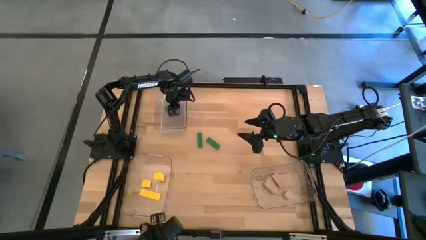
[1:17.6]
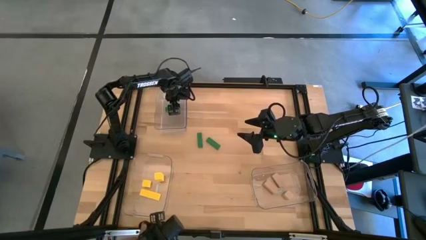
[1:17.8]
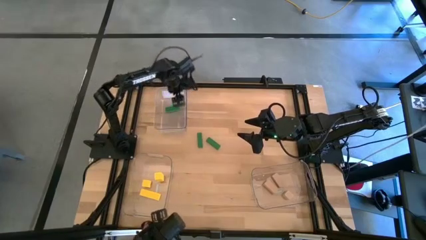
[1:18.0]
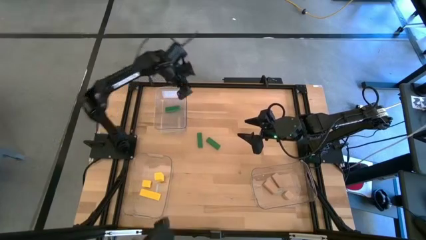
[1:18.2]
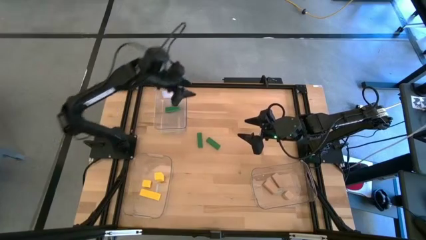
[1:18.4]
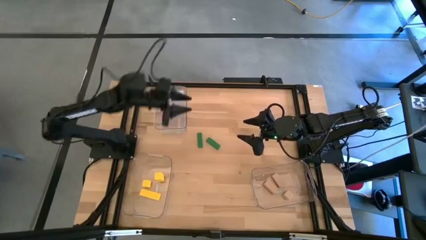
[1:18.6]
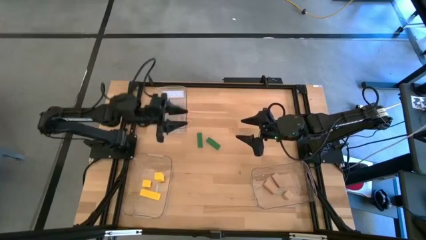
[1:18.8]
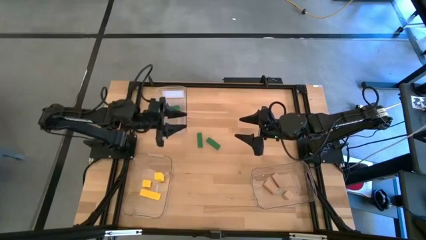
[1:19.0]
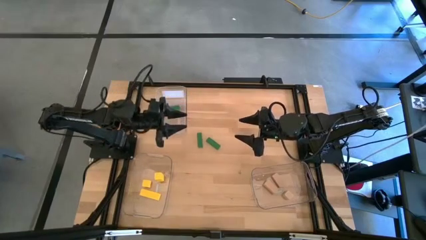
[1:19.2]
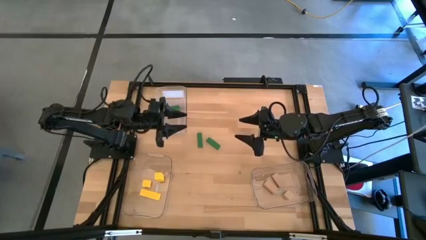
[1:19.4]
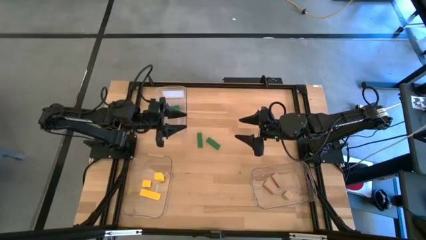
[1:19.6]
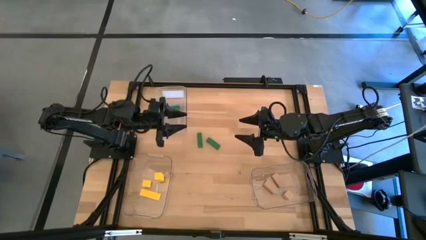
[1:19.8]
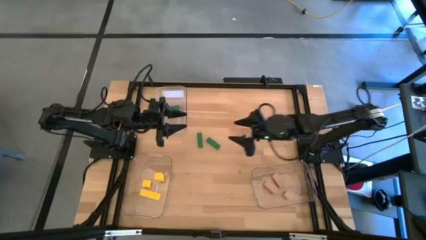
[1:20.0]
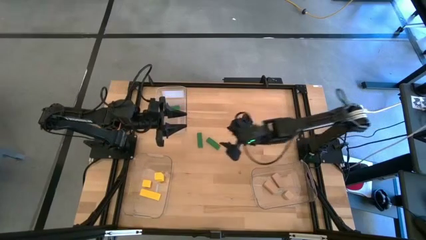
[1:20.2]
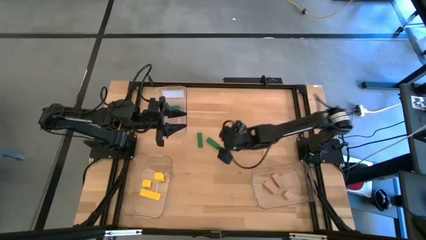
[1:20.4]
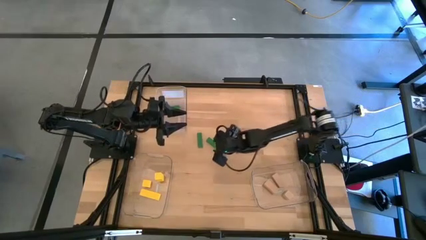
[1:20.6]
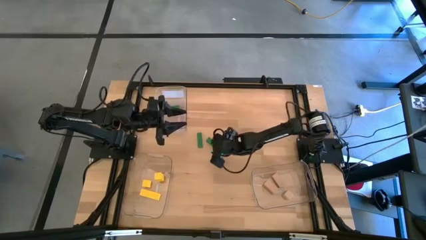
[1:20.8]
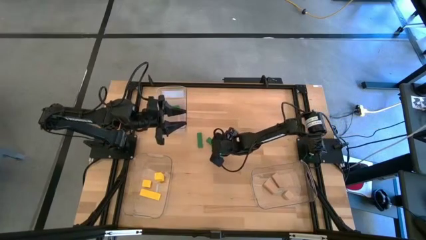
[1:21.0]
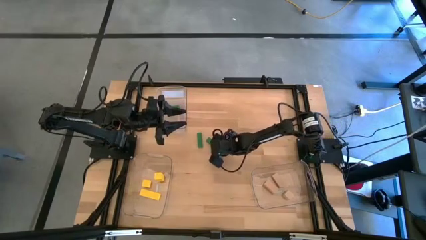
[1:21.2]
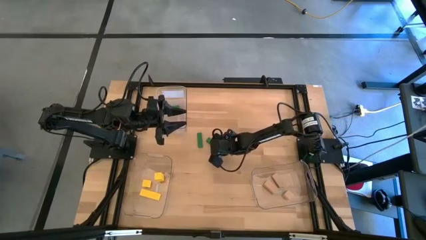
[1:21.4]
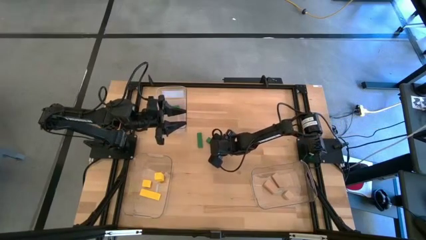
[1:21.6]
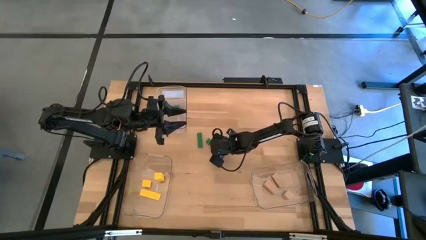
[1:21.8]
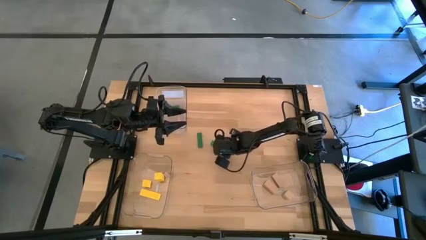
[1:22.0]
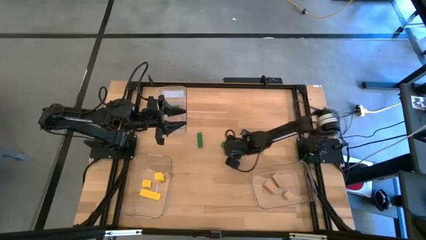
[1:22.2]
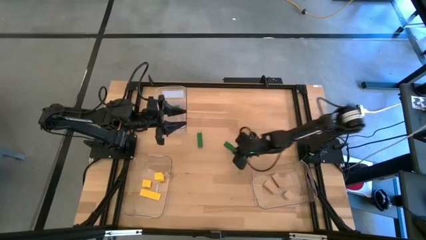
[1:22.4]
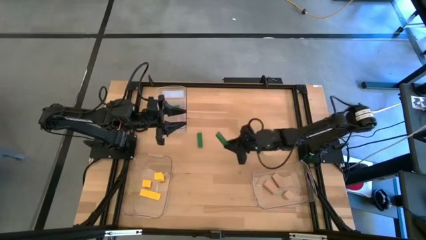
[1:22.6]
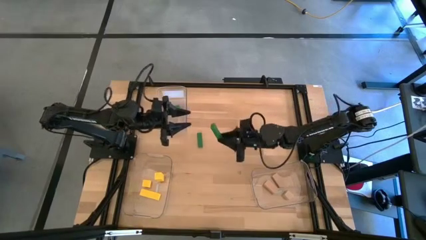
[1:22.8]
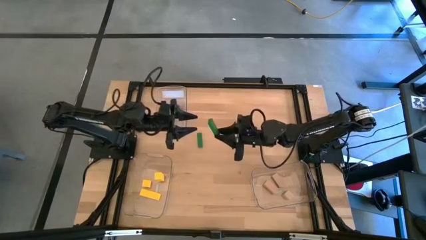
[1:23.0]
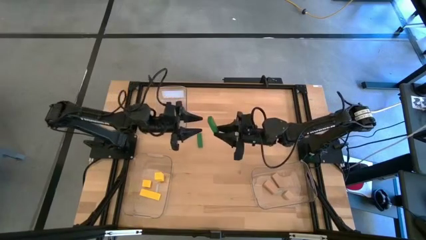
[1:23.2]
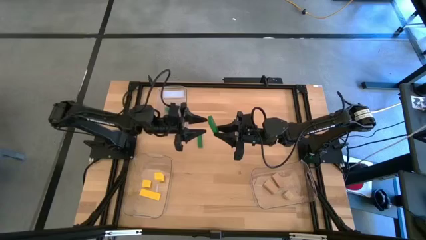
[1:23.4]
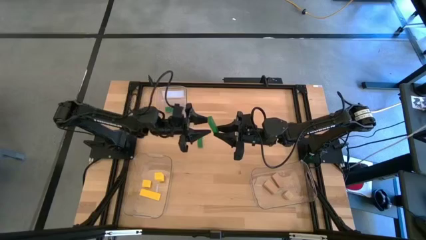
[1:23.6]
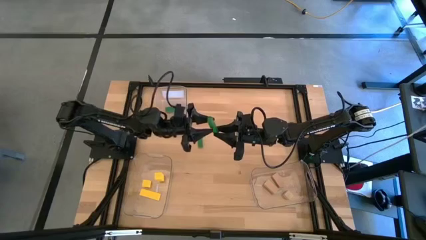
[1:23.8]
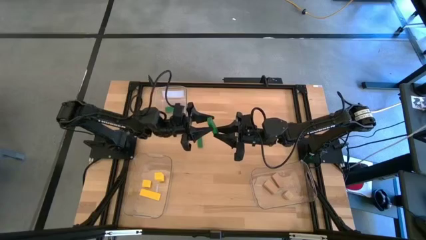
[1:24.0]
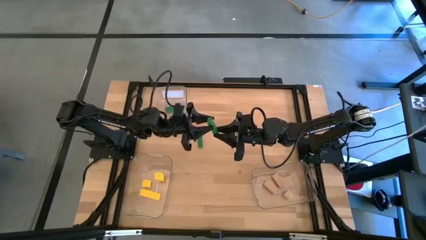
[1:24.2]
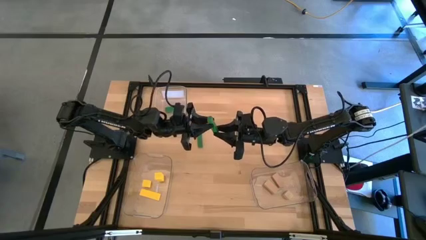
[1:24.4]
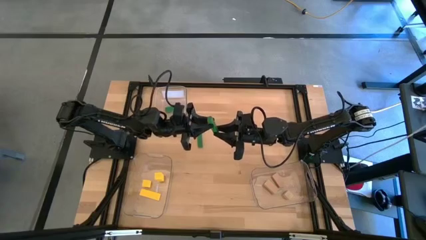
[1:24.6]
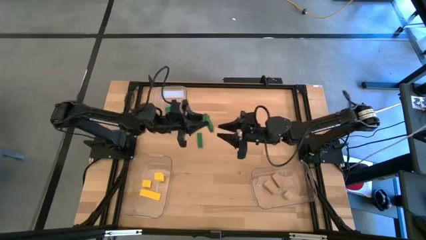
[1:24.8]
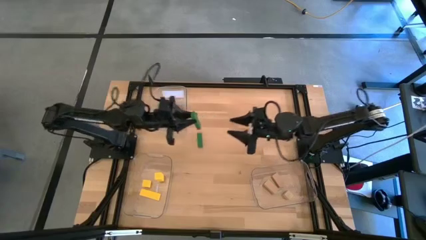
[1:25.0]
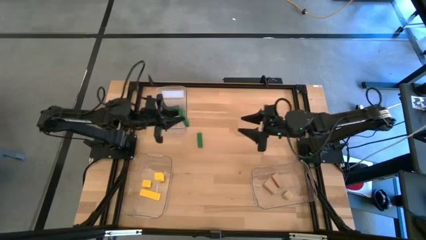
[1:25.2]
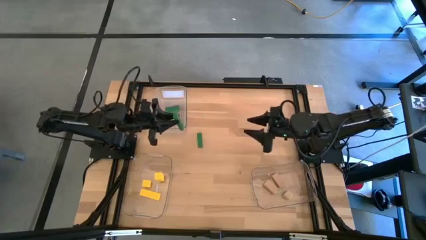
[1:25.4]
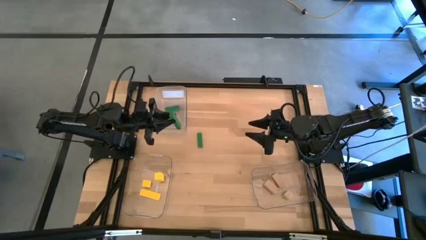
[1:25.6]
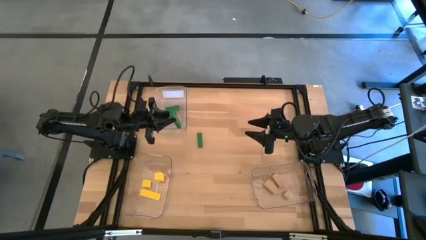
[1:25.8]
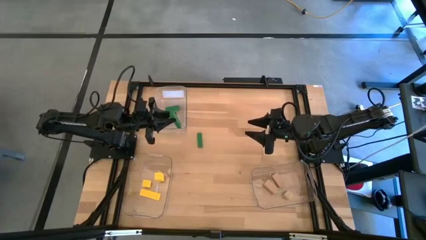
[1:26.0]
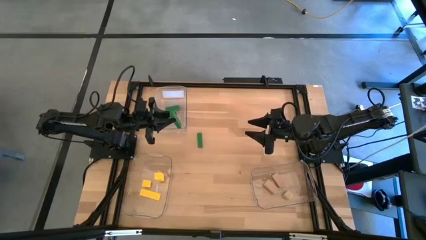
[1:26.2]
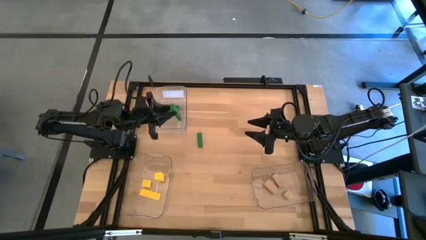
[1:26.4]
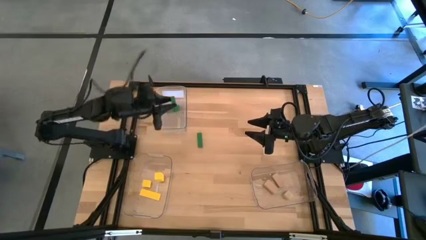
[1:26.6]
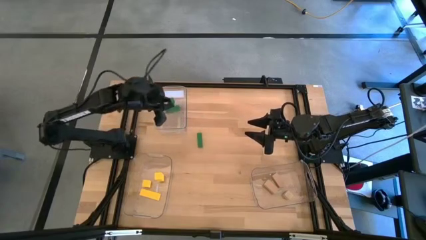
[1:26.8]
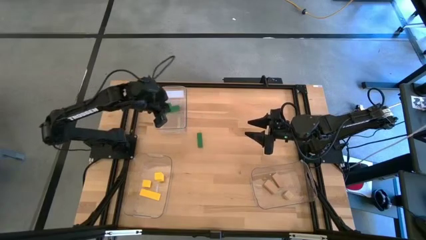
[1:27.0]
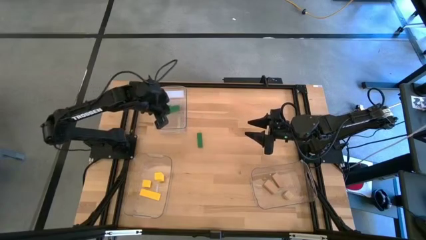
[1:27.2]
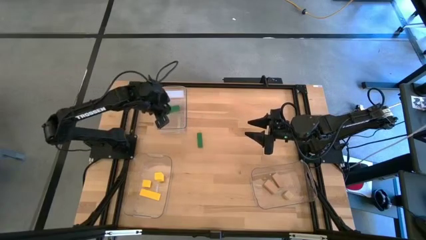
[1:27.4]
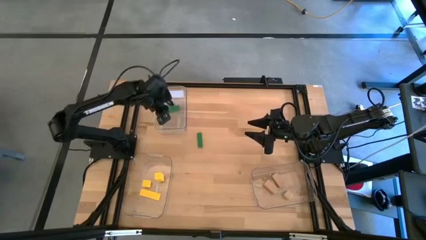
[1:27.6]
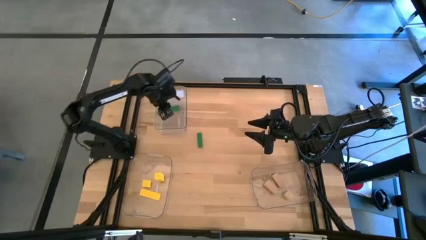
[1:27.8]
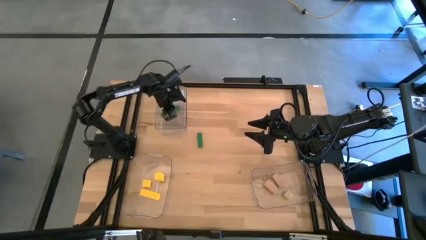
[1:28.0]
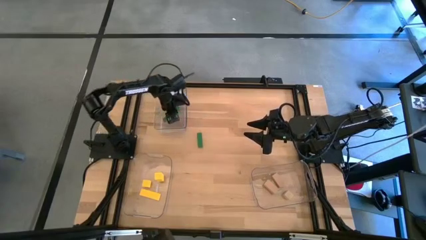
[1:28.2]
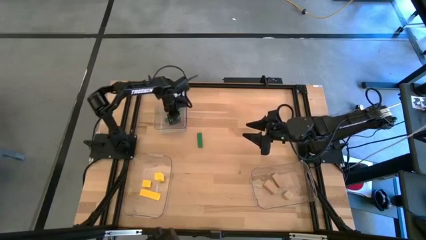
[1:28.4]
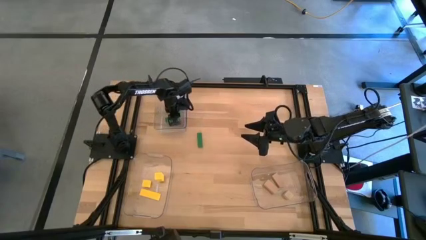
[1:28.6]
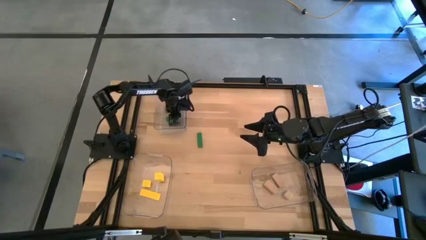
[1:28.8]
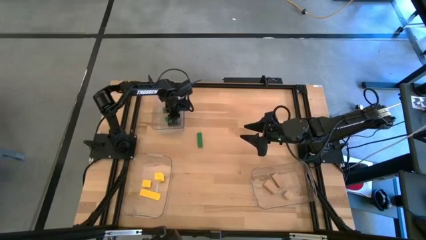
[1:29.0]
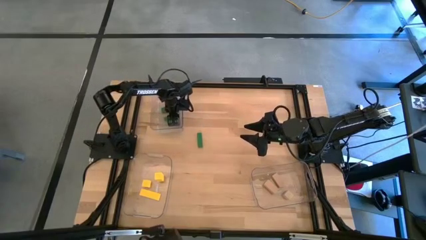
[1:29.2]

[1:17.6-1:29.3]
Task: Sort & place blocks by color
Put the right green block into the top left transparent bin
